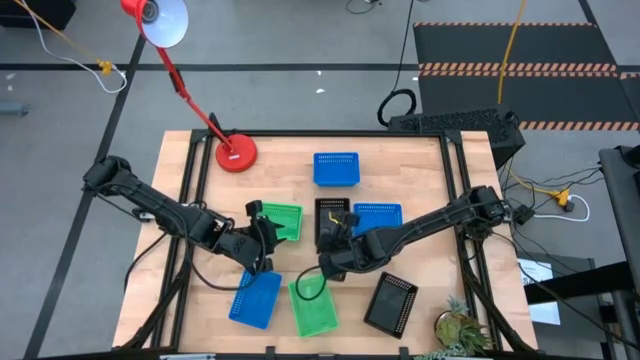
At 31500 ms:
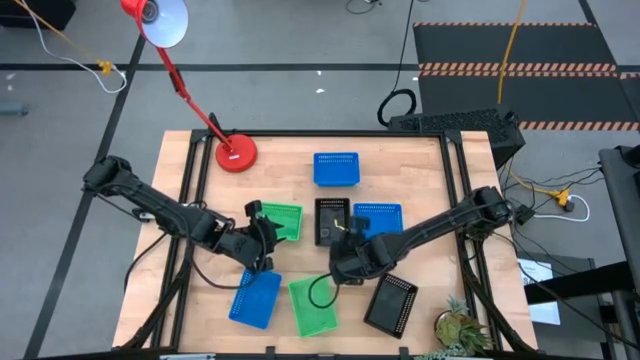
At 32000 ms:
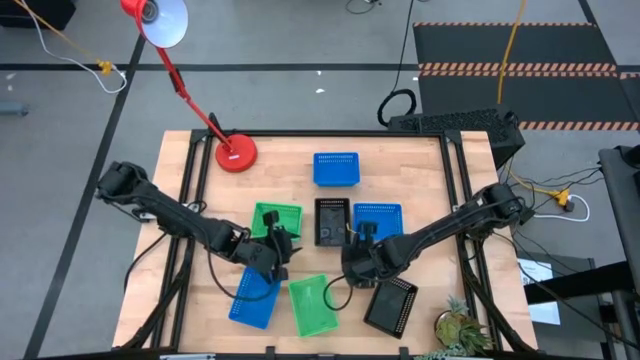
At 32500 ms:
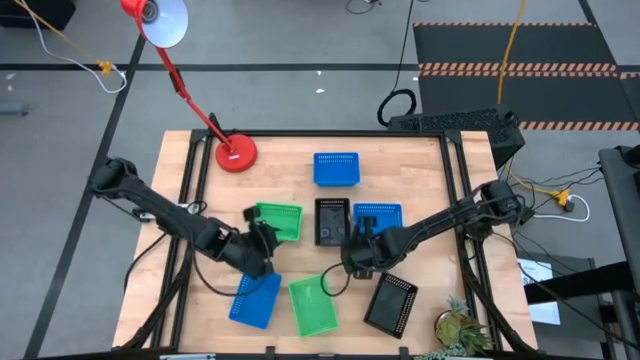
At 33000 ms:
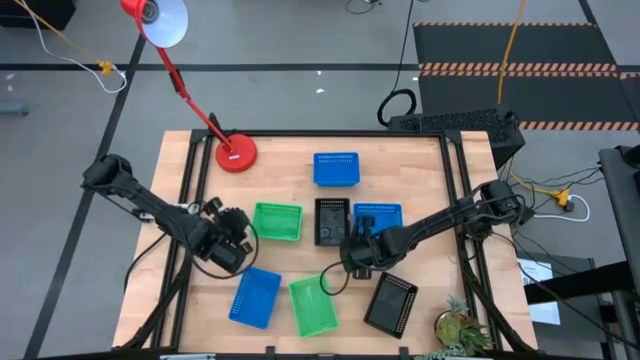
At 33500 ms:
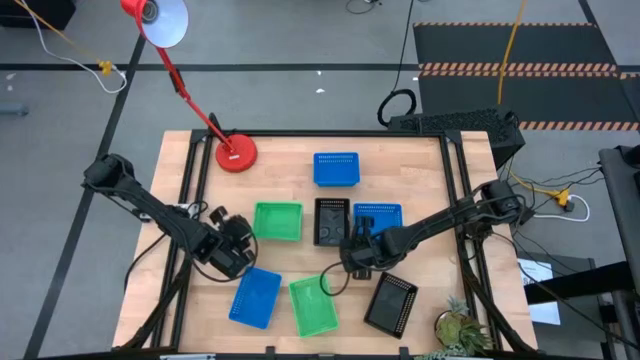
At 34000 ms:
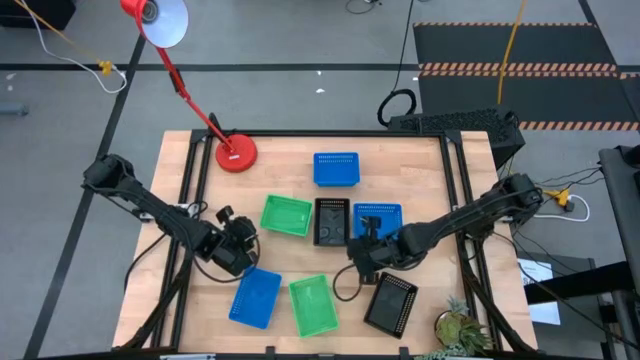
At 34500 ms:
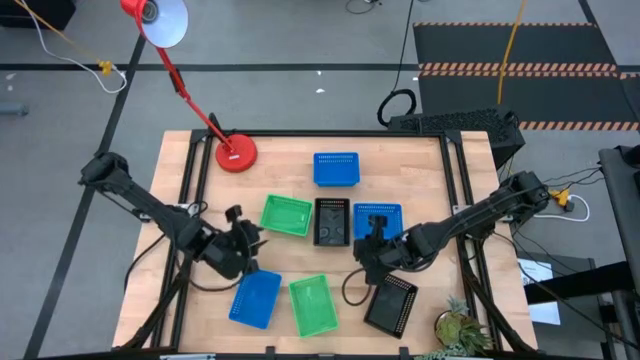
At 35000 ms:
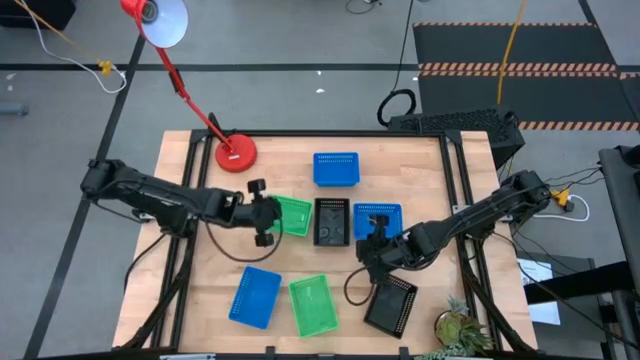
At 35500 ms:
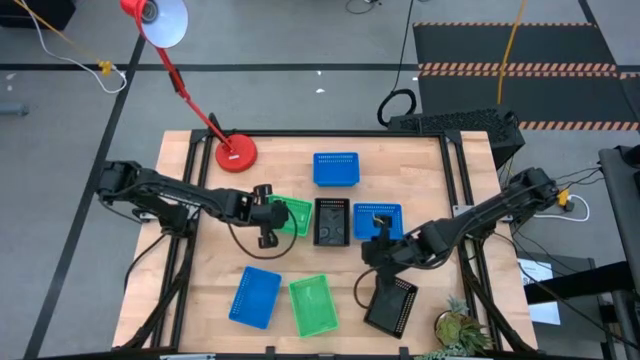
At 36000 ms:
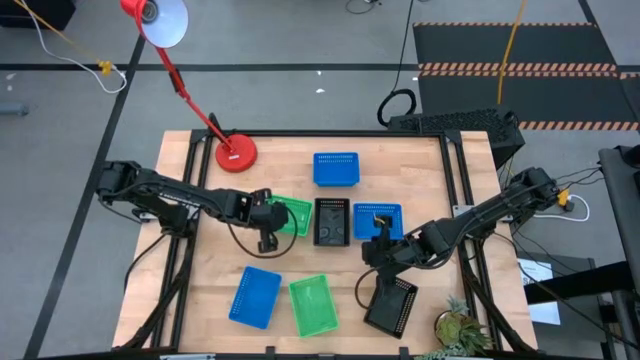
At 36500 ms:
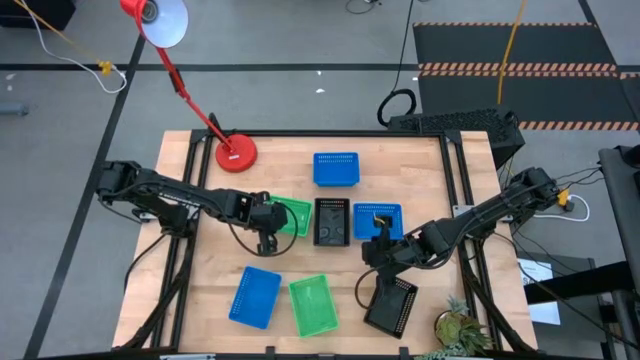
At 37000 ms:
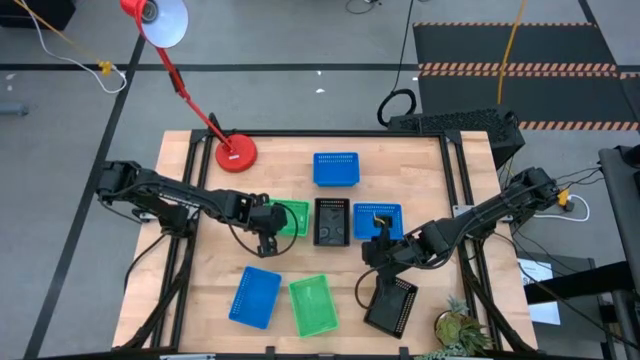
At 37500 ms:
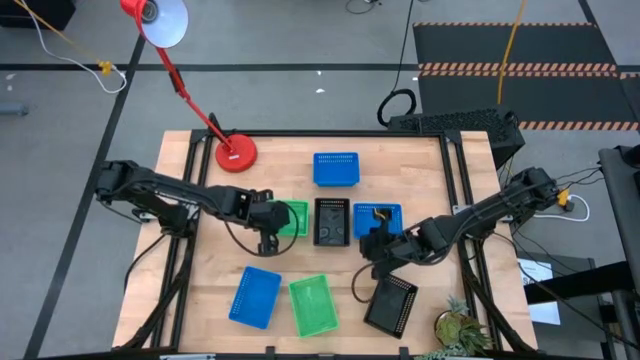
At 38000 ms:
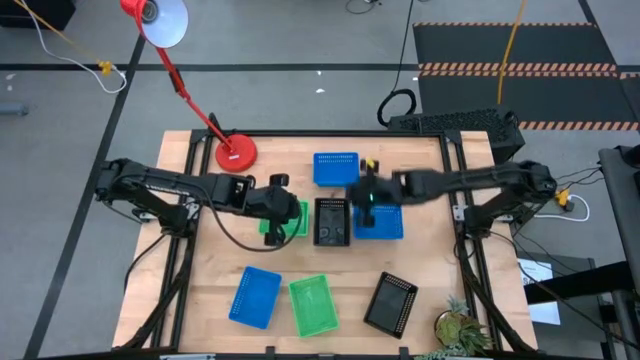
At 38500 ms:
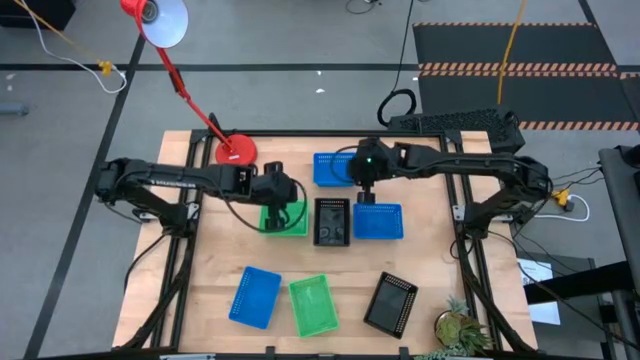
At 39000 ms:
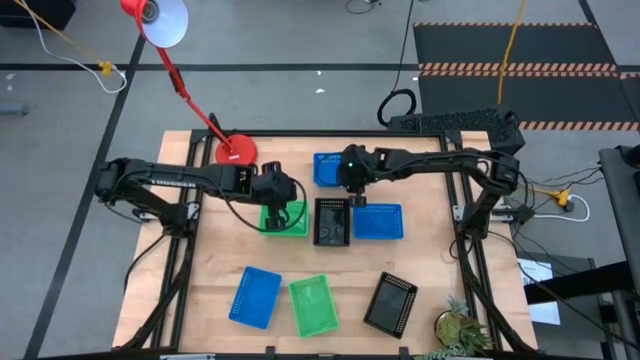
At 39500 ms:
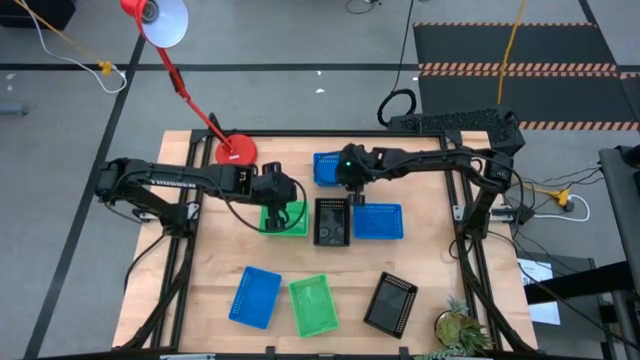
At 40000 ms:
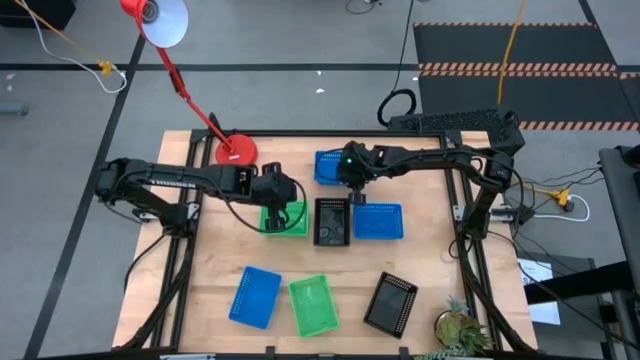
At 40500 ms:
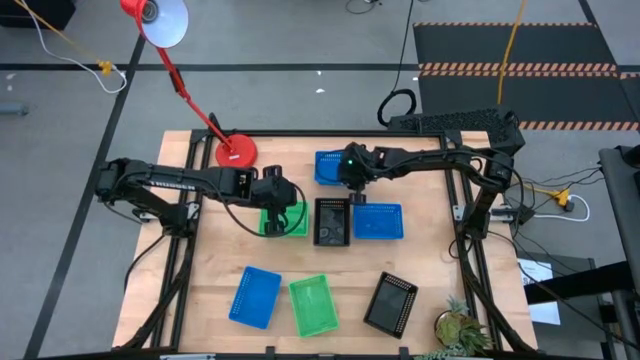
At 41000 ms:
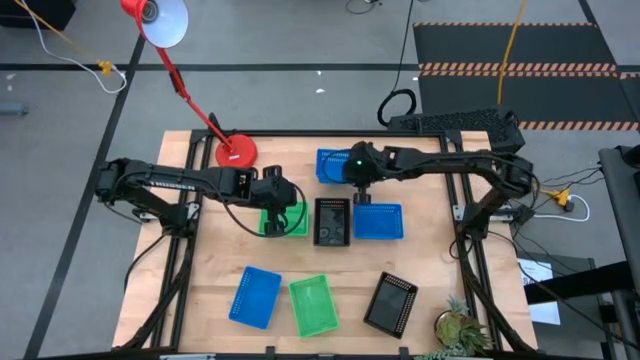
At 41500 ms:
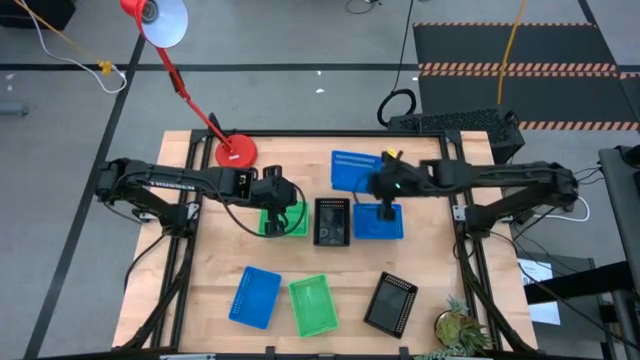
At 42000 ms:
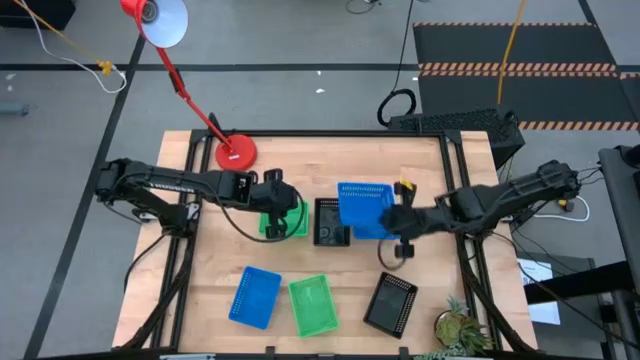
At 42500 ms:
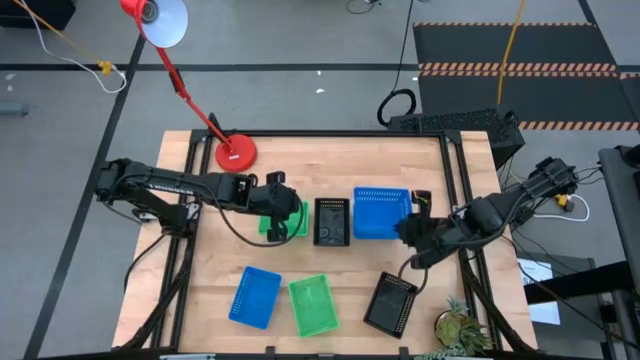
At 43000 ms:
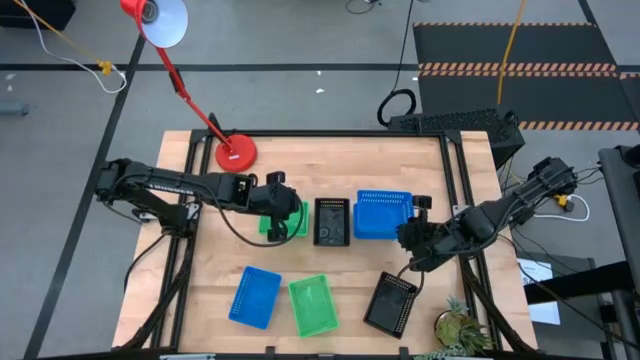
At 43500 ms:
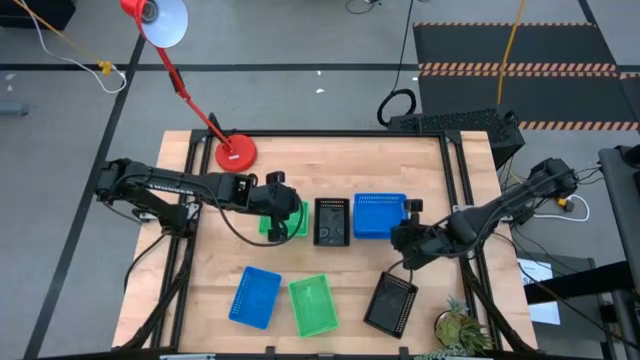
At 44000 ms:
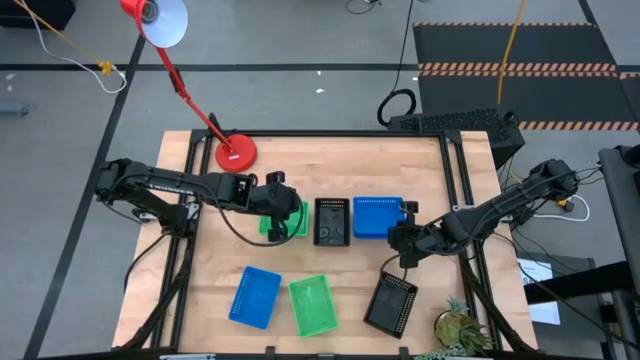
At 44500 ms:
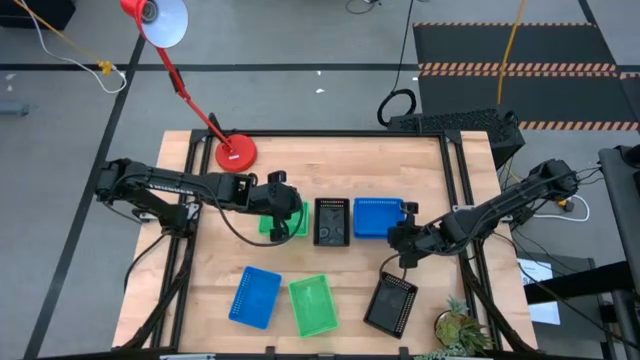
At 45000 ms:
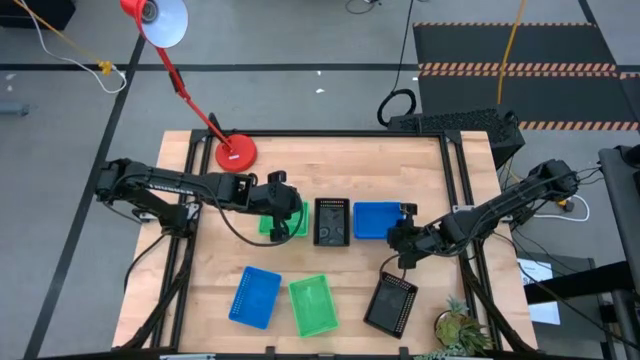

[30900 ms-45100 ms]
Stack the top blue bin on the middle blue bin

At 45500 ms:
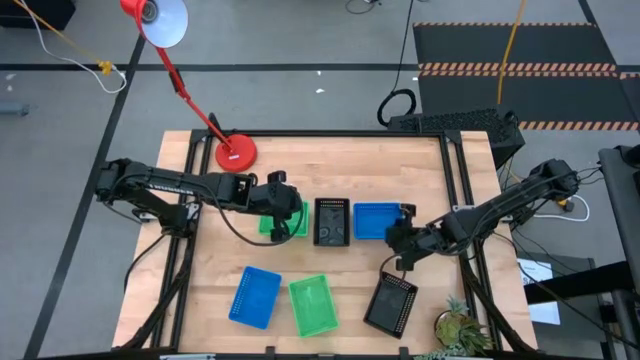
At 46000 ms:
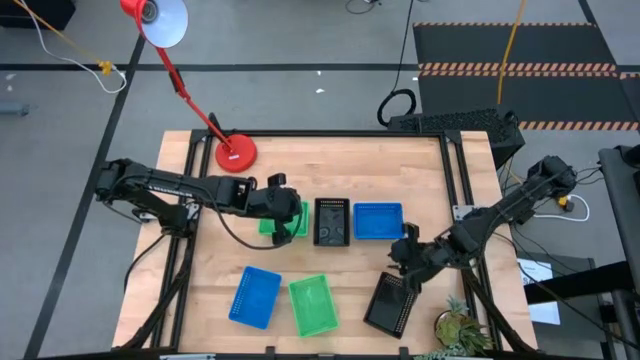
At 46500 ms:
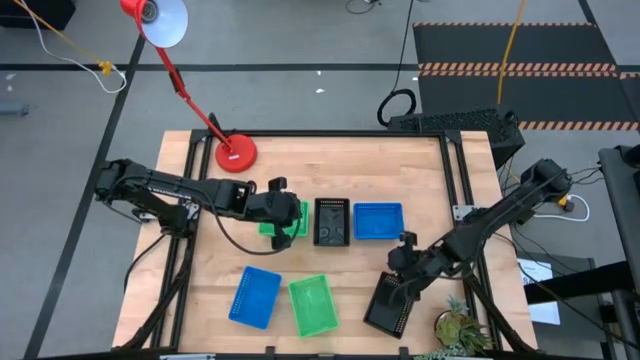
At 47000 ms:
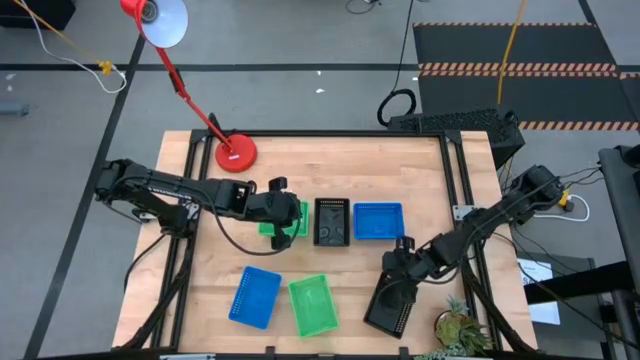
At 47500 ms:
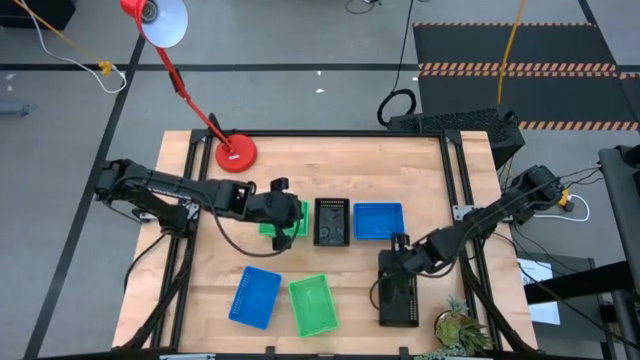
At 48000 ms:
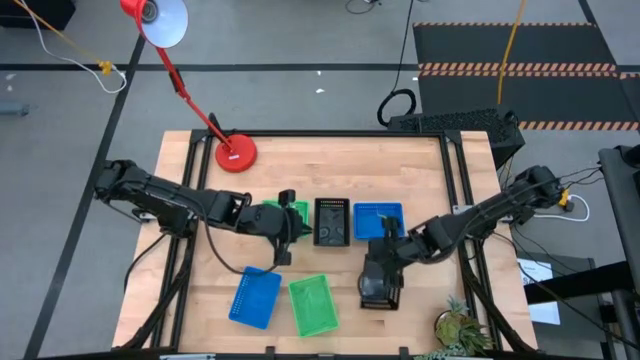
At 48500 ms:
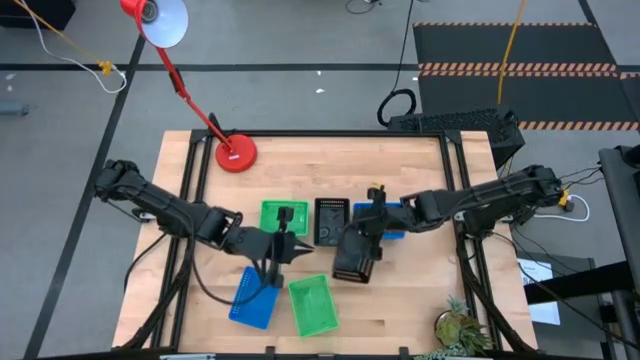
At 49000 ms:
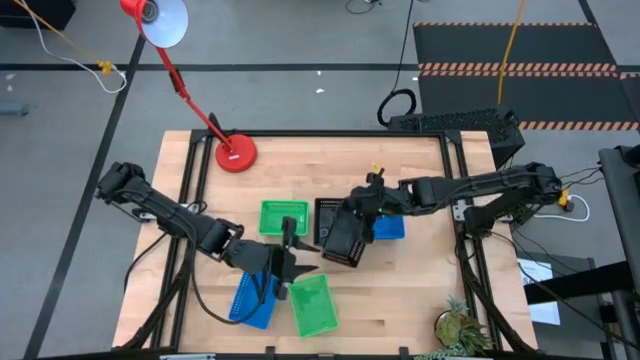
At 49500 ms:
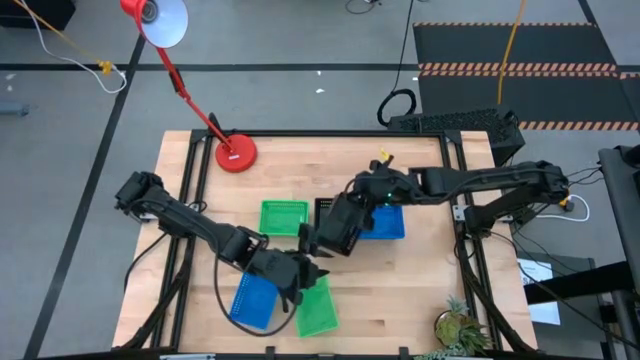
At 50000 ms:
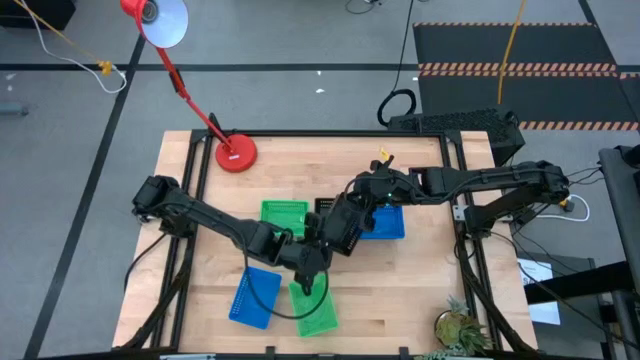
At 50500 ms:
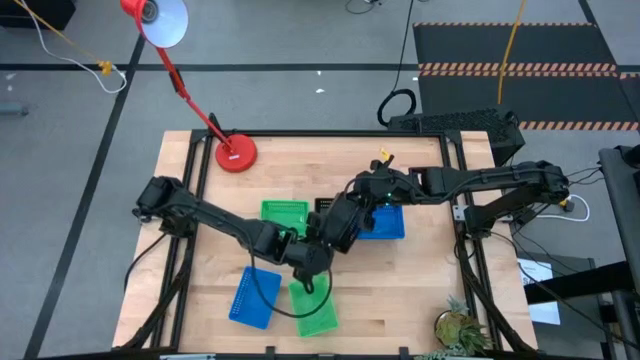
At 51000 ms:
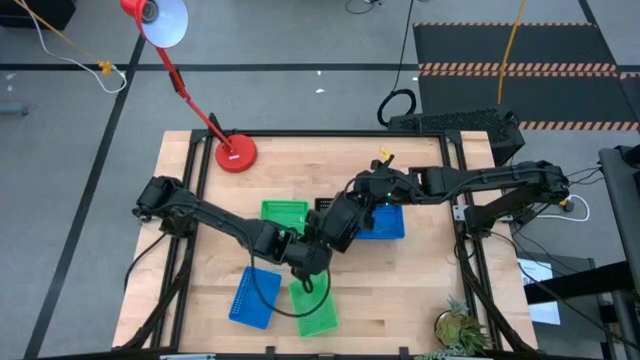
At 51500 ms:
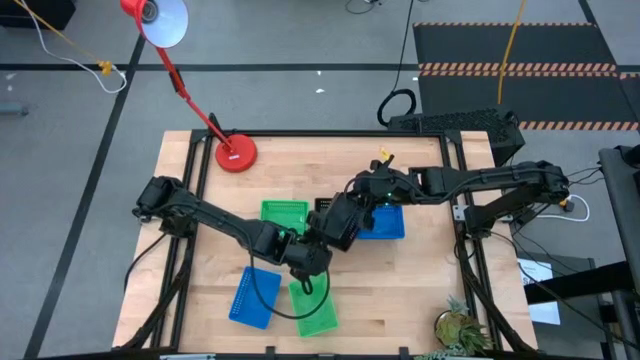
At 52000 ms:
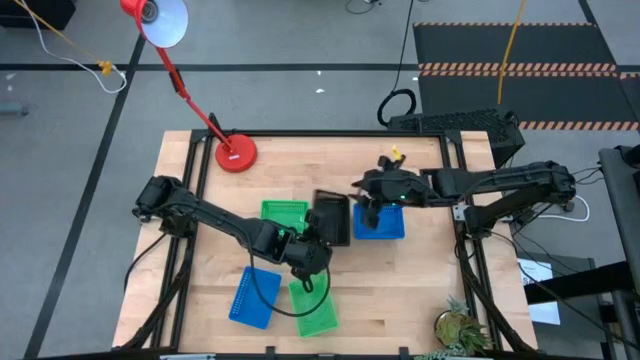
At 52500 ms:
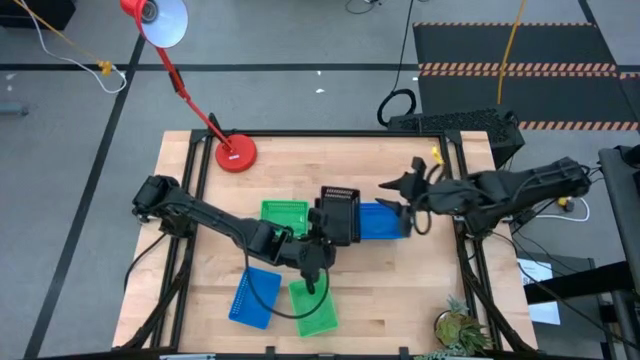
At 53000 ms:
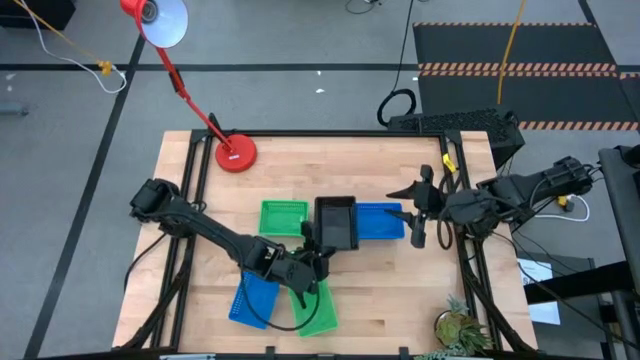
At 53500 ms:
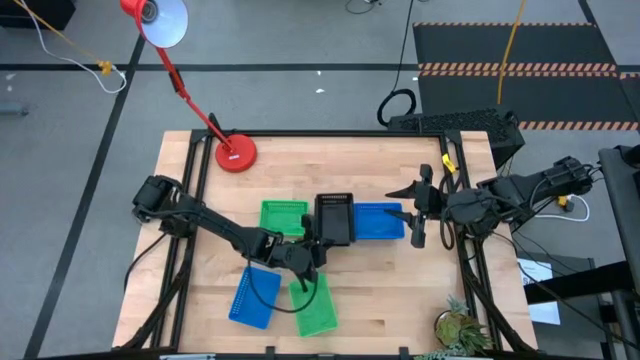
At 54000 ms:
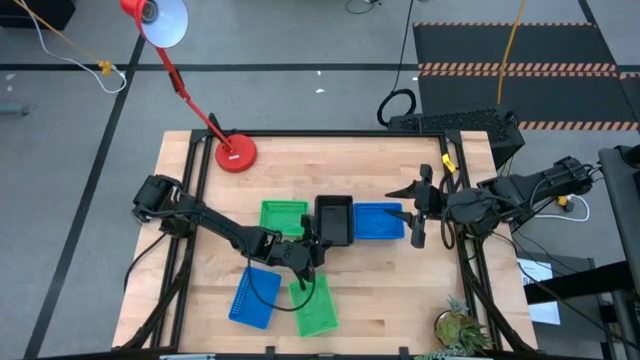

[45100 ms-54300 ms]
Stack the bottom black bin on the top black bin
